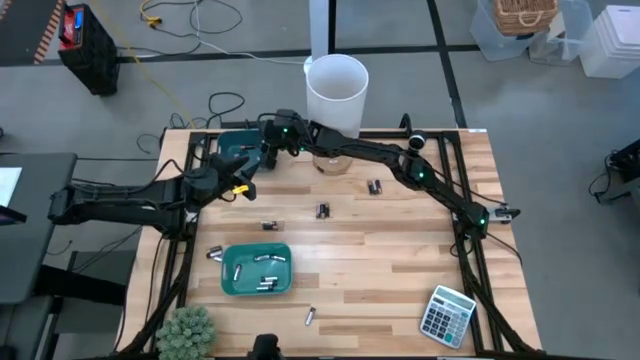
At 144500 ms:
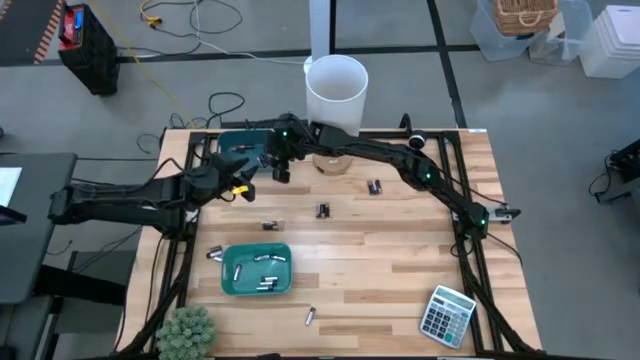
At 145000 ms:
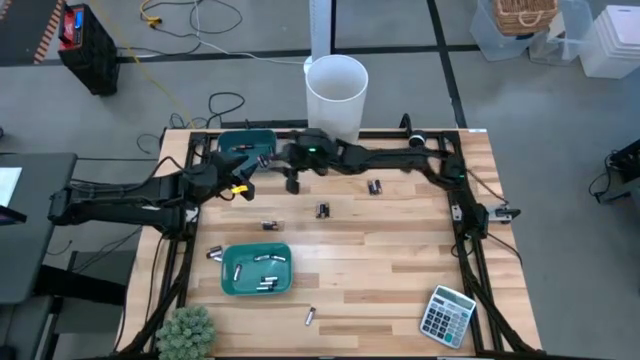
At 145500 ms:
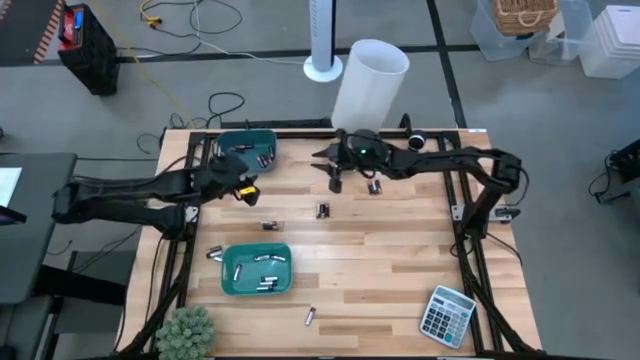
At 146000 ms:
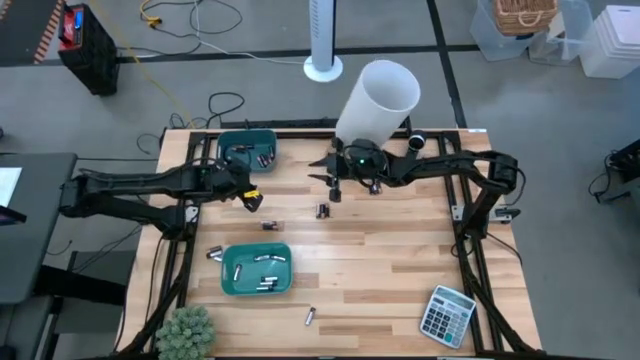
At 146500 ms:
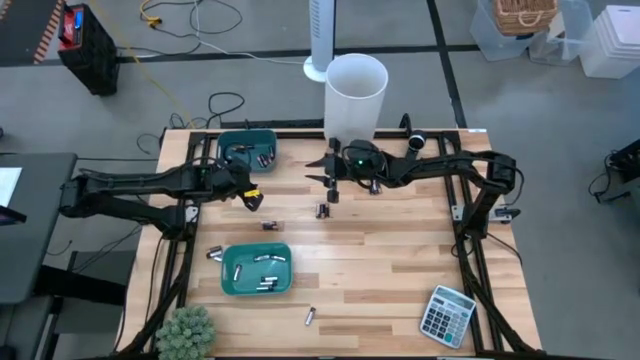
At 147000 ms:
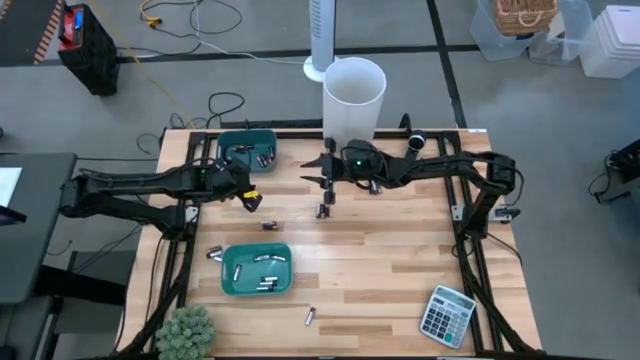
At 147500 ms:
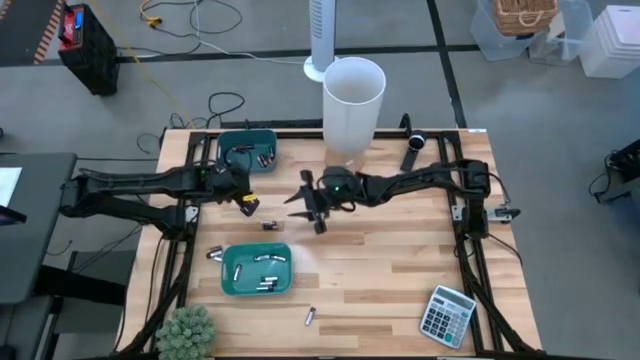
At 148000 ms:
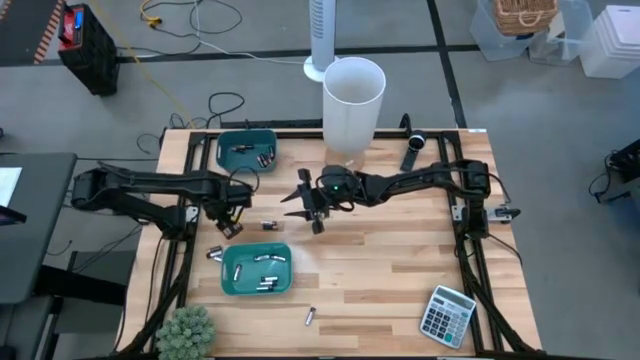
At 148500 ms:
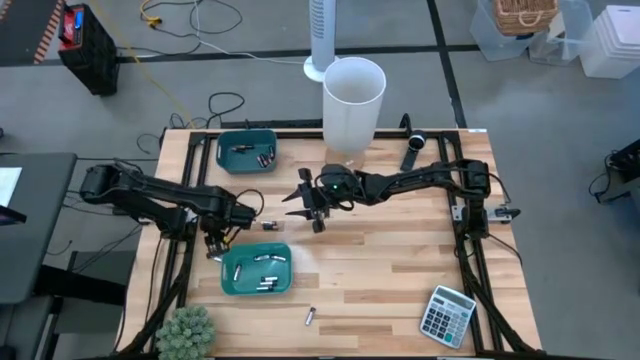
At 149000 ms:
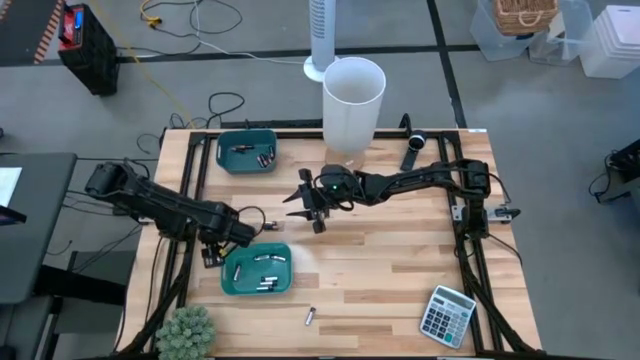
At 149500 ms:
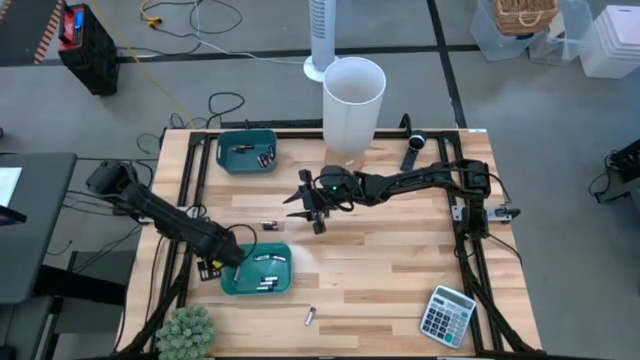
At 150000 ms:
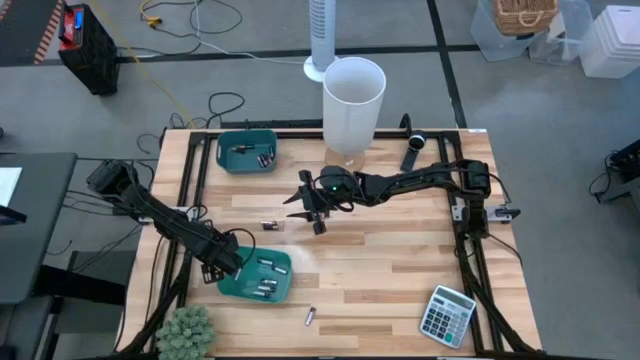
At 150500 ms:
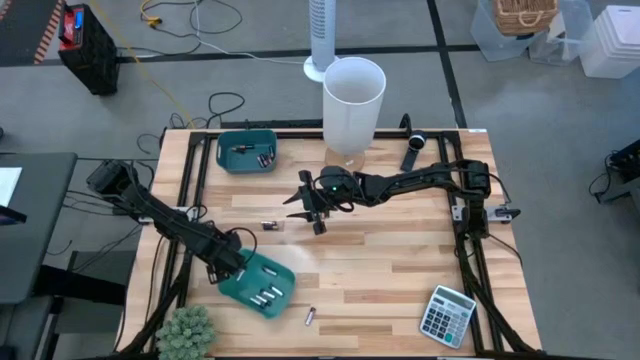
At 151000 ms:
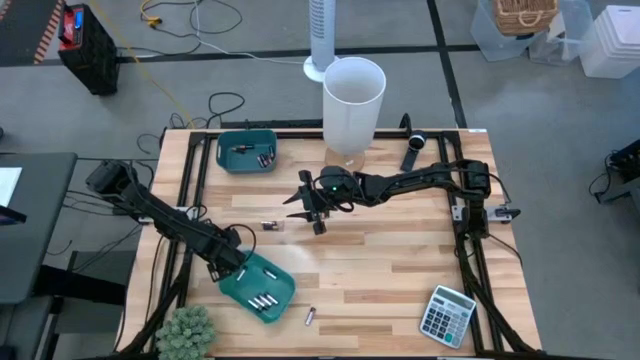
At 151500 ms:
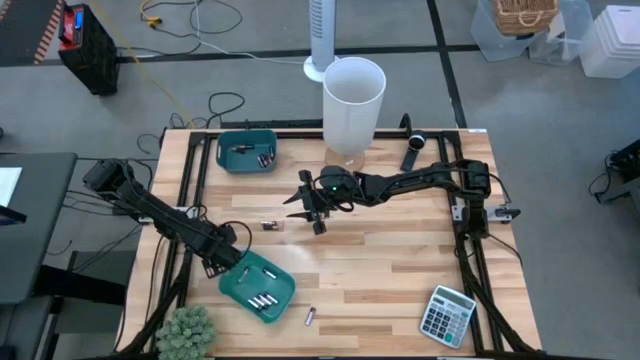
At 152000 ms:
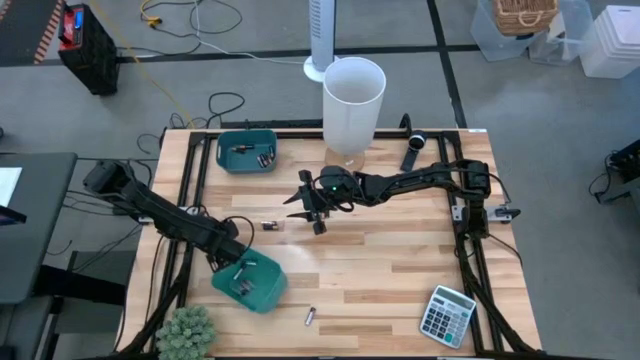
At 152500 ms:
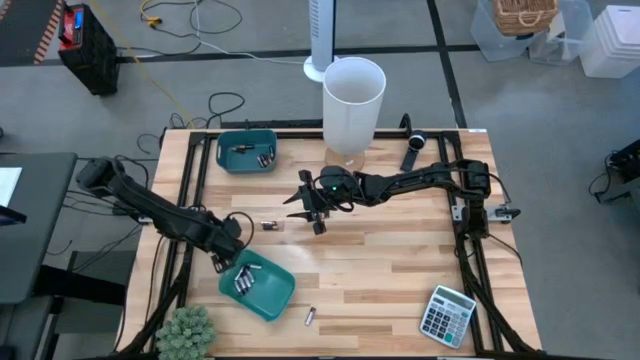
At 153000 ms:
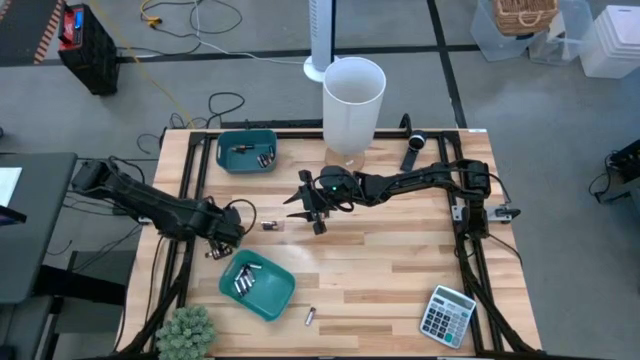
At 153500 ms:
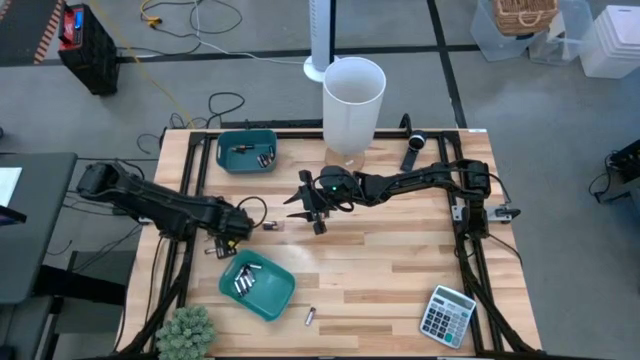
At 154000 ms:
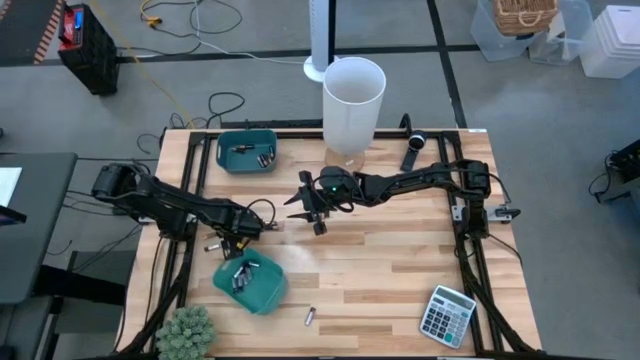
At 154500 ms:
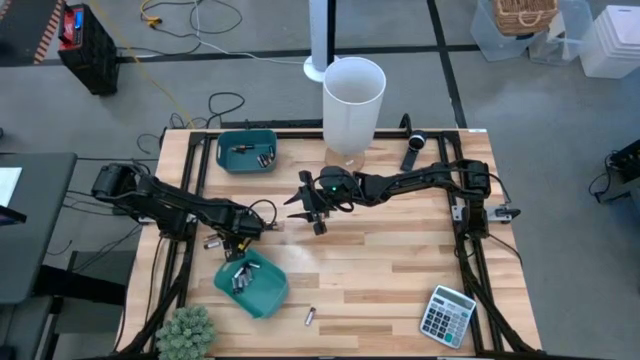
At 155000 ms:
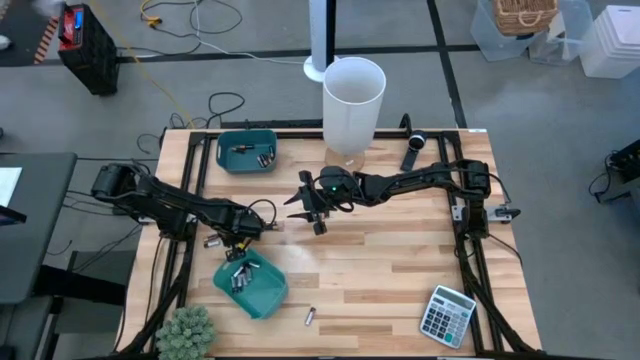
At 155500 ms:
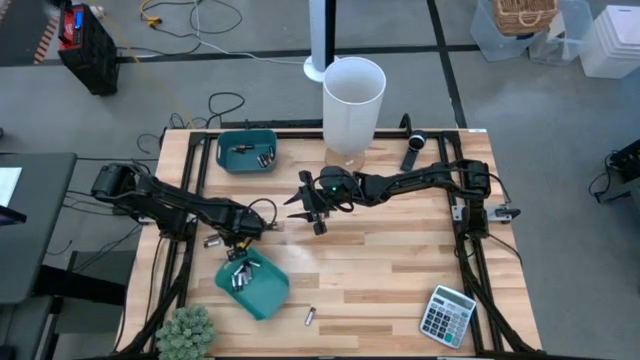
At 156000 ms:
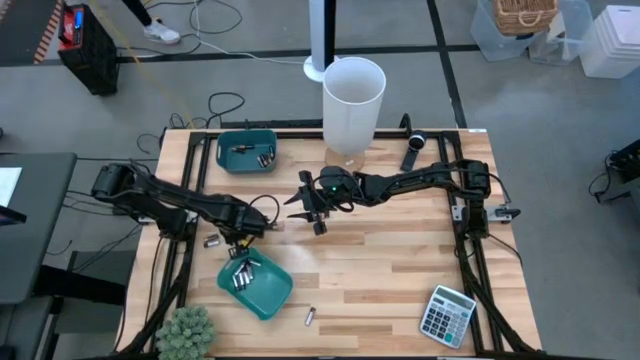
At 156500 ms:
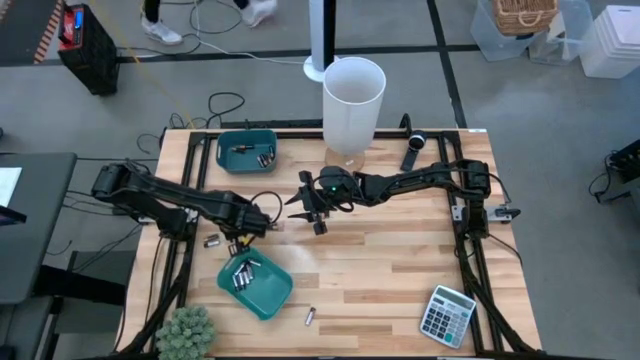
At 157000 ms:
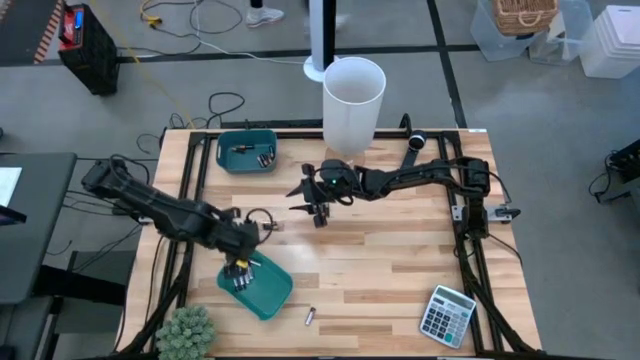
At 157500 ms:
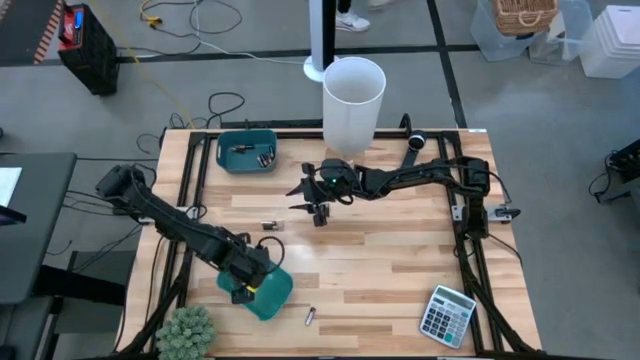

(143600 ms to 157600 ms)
Task: Sort batteries
Put the silver battery into the green bin

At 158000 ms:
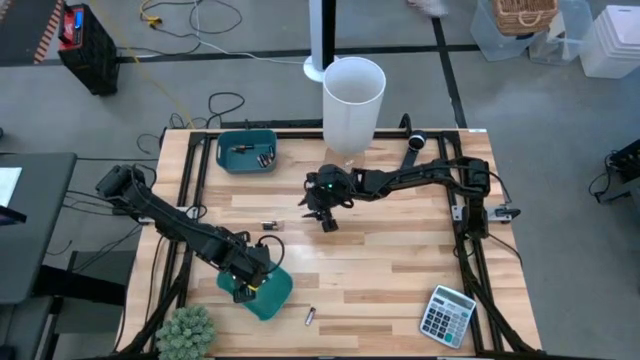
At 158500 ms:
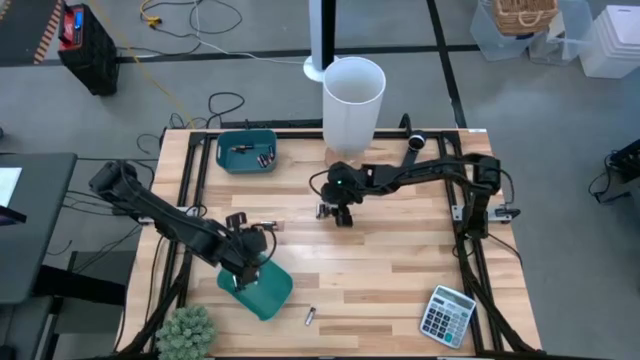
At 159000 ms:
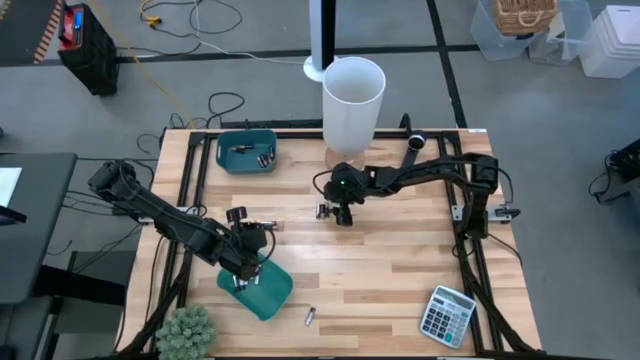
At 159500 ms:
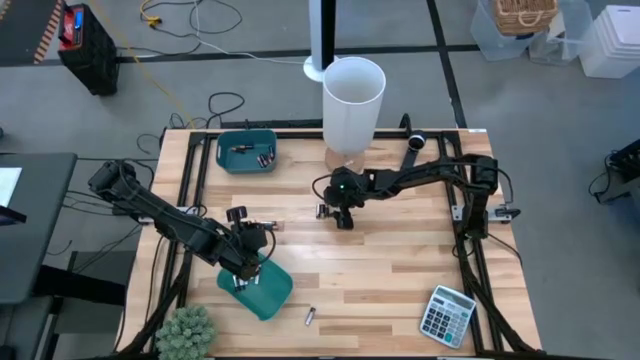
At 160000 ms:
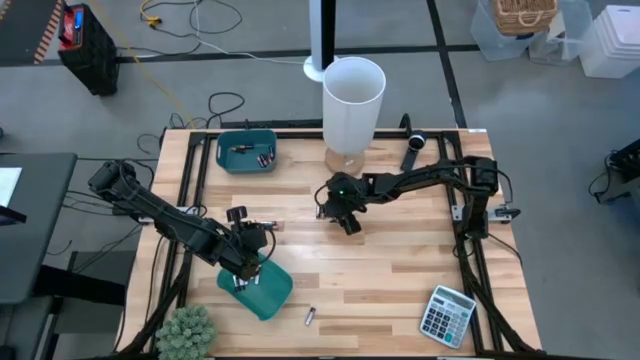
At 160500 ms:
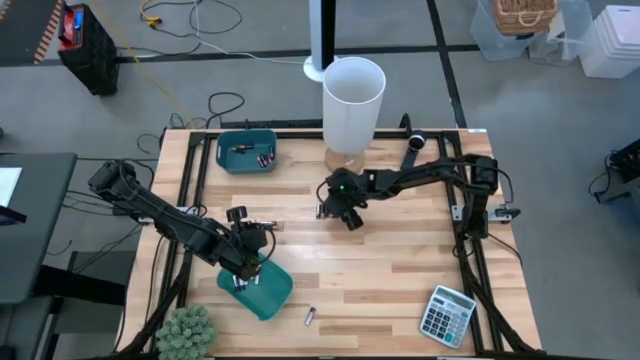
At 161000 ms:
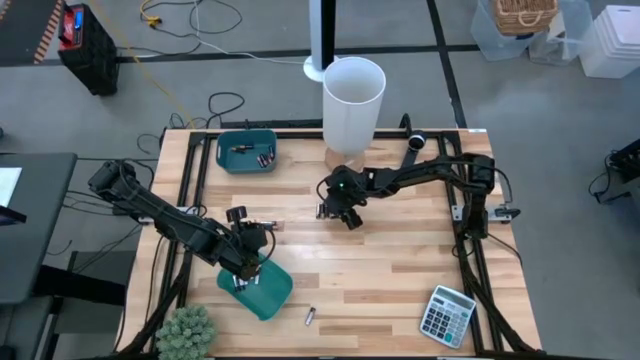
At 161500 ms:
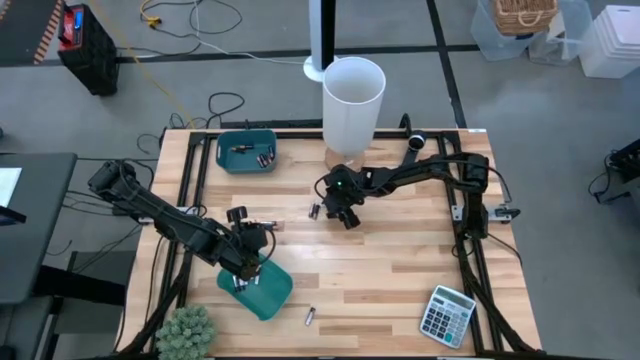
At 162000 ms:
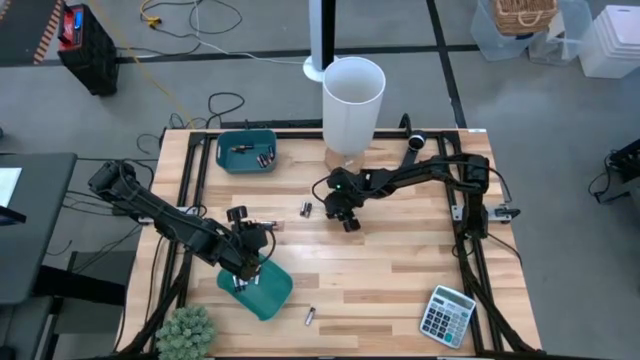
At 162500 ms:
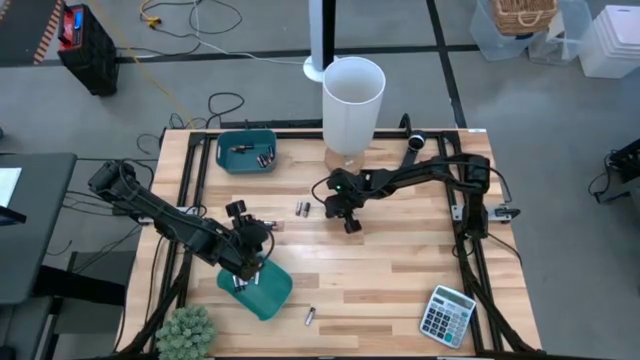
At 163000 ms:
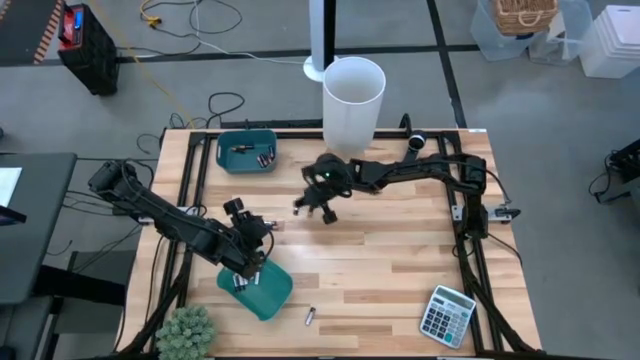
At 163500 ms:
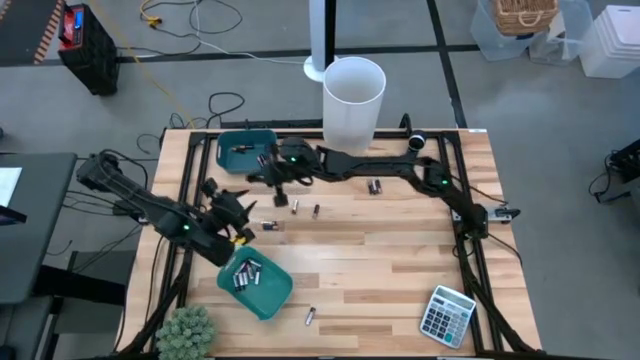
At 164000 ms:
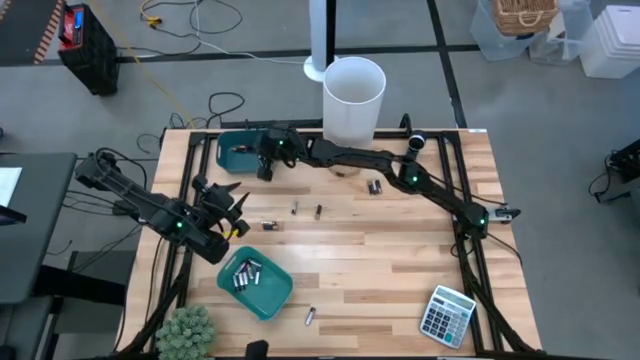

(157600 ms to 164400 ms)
Put the black battery into the blue bin

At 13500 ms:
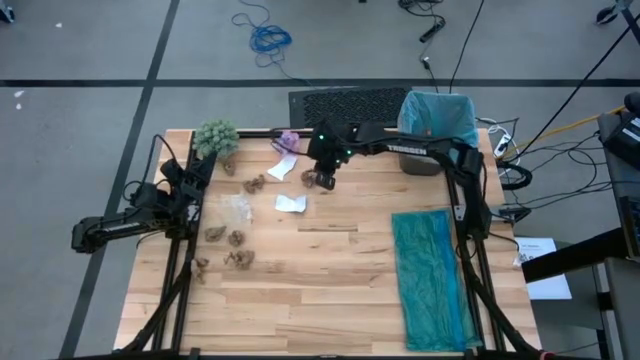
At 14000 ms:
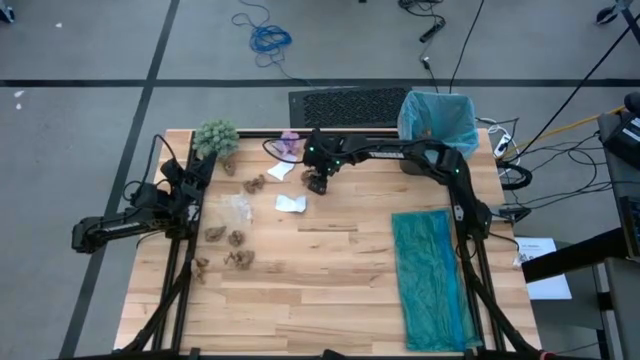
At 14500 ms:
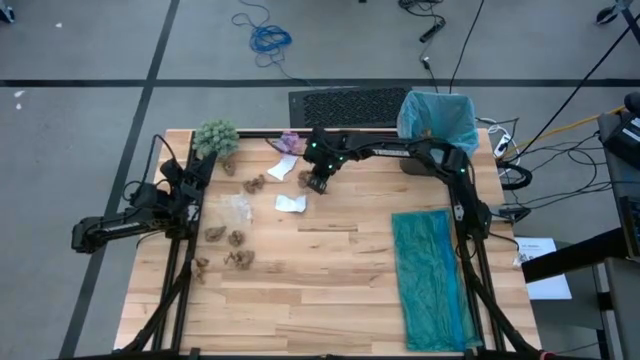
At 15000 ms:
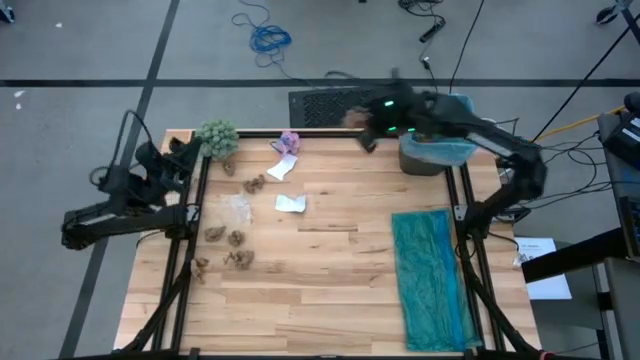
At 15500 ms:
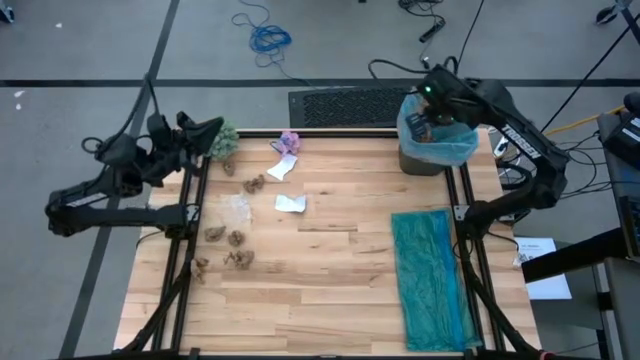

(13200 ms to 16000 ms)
Task: place trash/remove bag and relplace
Put the brown paper into the trash bin
